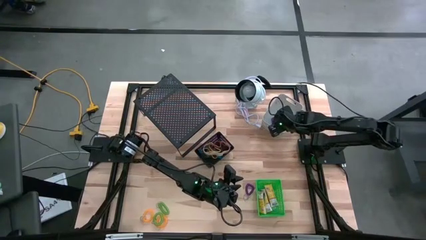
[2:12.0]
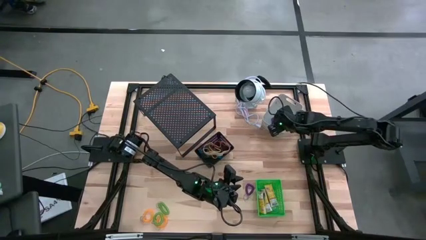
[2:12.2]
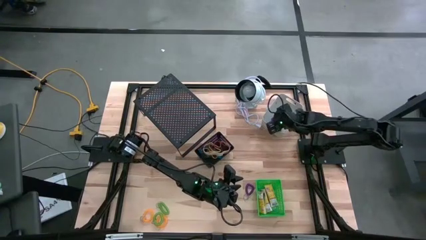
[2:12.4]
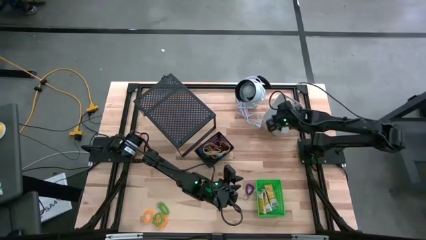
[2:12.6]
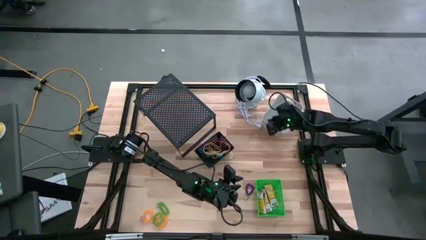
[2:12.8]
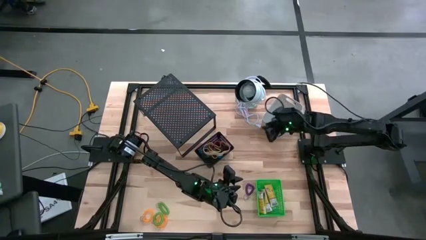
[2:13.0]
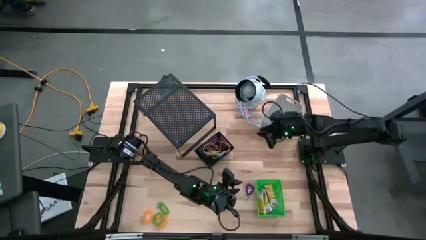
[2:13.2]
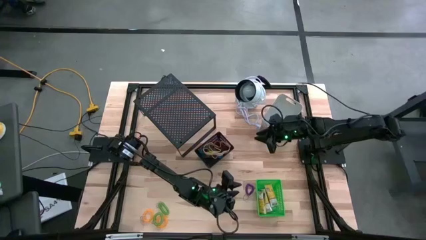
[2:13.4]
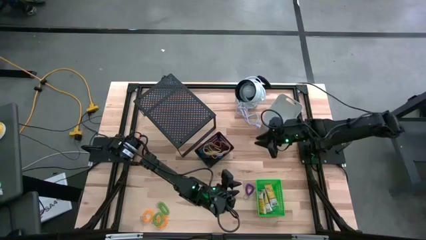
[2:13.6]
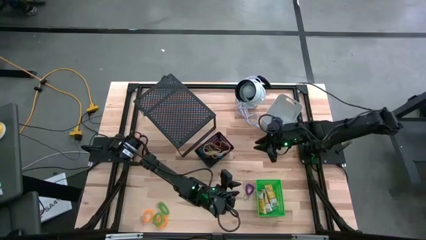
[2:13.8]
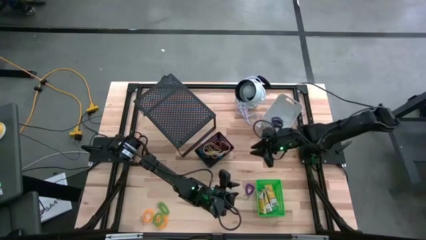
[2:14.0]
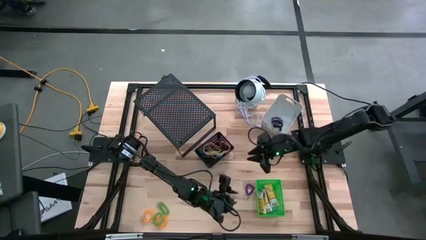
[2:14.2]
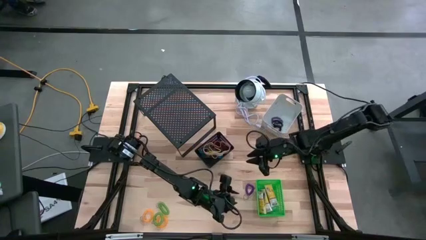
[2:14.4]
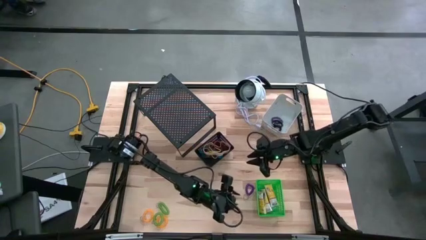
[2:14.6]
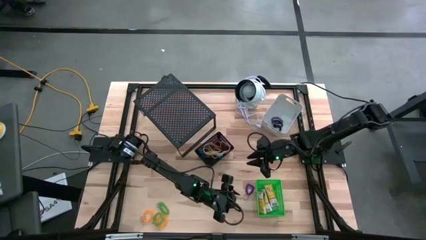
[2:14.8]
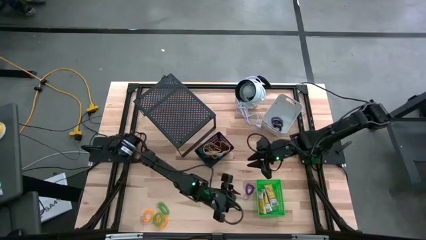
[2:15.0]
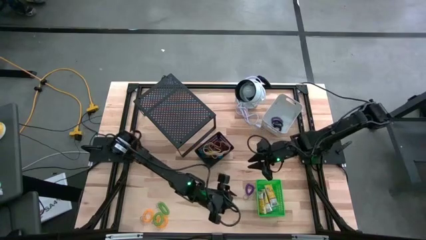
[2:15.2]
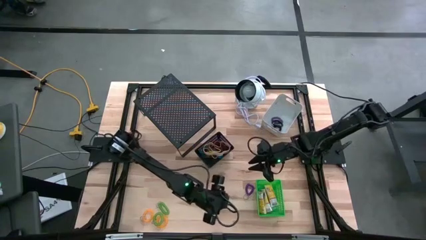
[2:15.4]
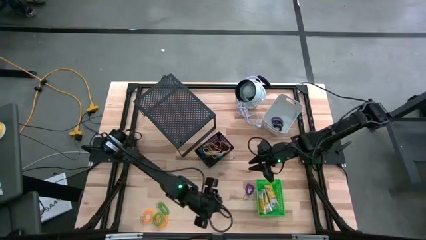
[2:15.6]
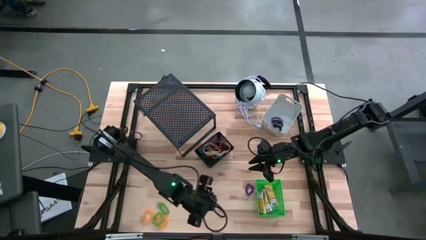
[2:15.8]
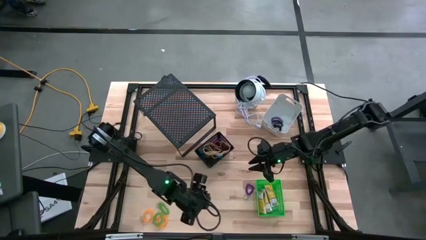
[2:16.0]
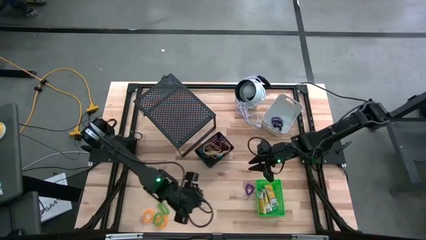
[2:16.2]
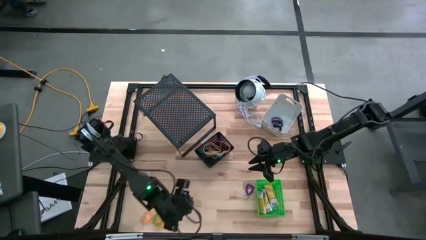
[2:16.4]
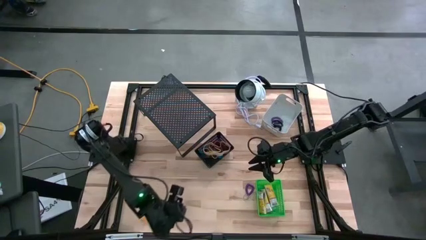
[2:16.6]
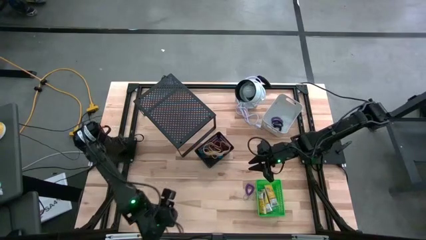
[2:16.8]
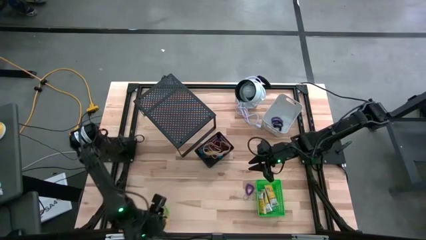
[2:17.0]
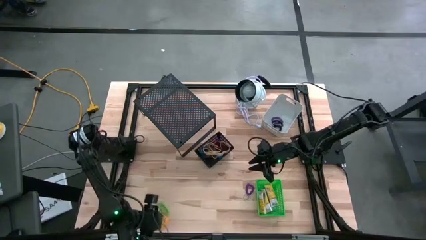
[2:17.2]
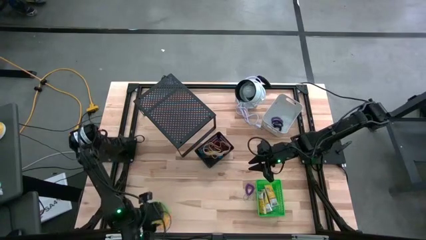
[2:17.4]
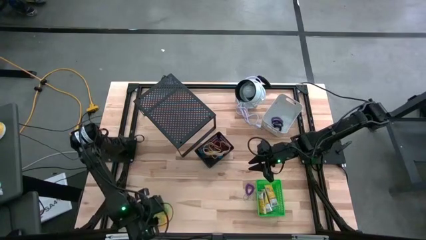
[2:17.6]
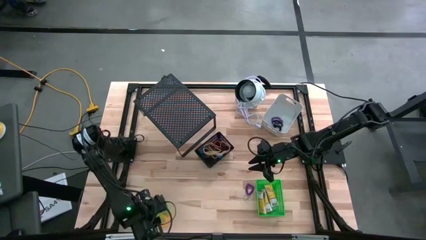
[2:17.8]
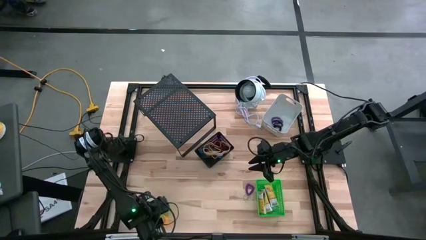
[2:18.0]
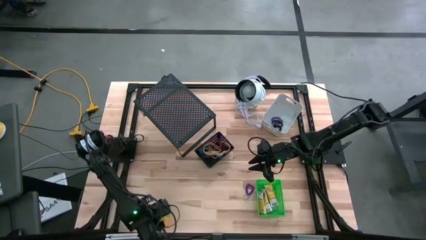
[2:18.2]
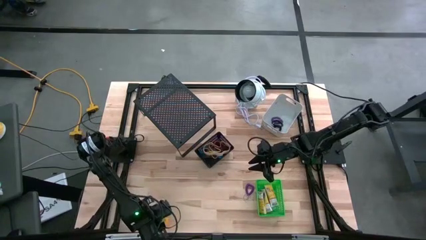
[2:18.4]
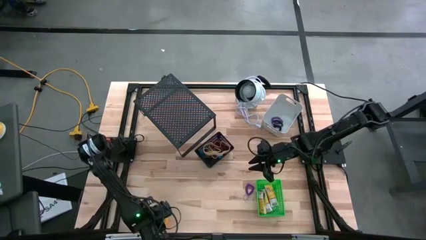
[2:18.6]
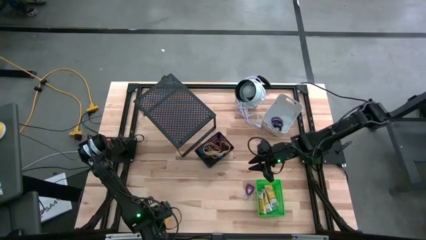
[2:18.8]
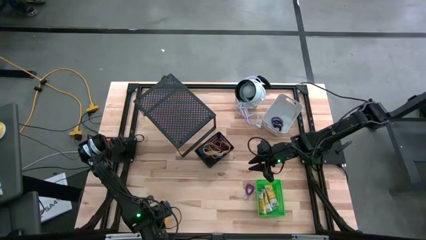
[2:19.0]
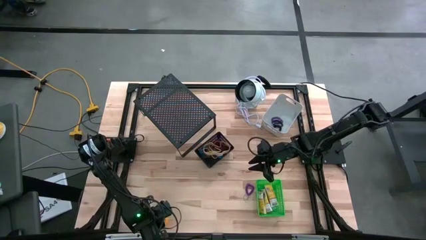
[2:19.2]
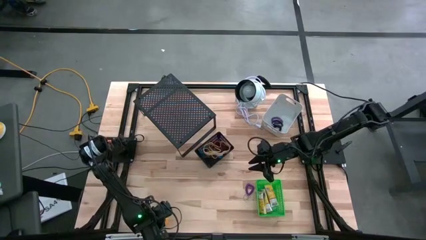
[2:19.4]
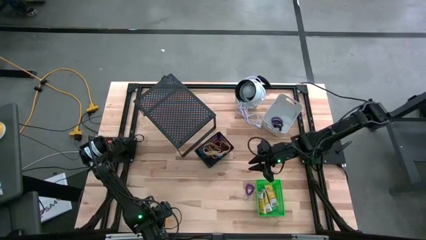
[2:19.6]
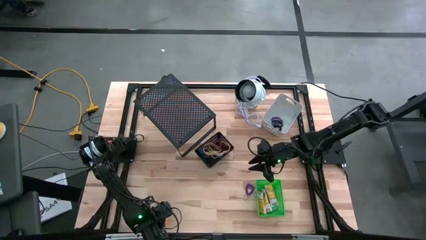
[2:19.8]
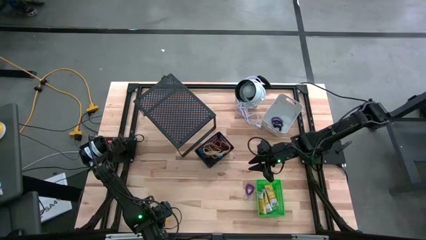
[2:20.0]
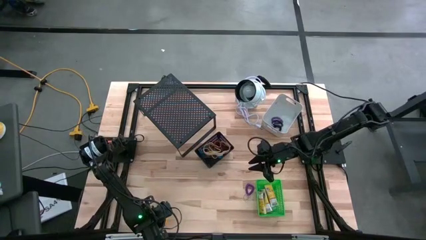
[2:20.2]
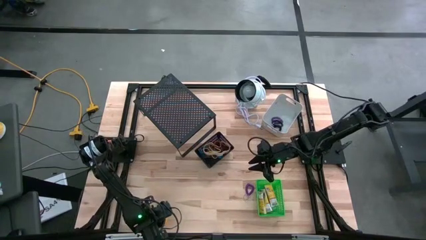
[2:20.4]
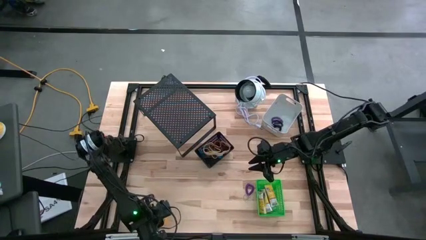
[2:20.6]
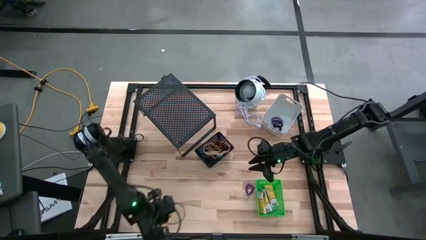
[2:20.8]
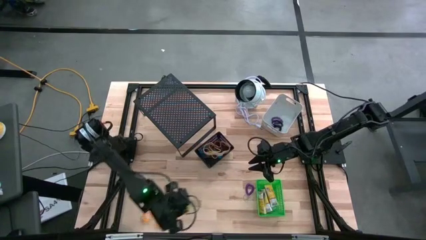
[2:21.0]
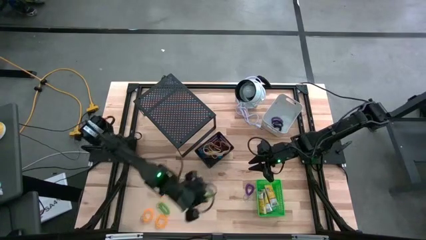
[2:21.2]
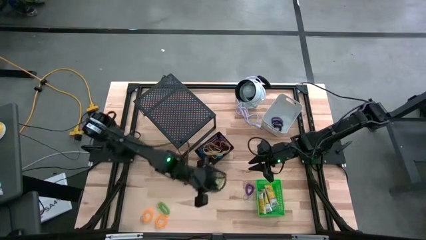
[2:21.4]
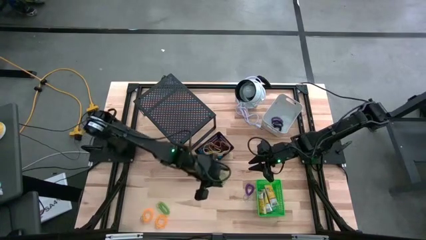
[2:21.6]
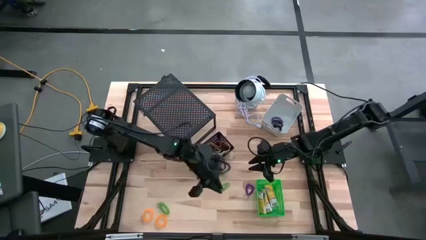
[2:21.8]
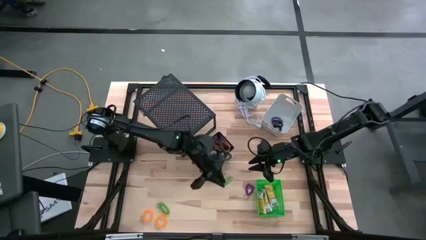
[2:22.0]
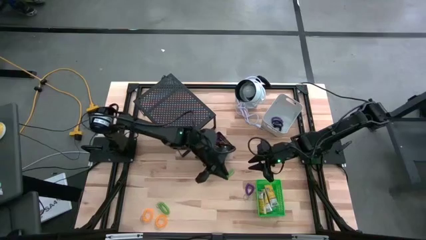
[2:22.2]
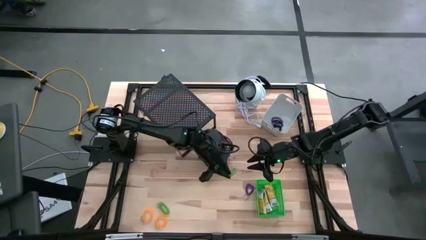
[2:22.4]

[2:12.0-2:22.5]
Task: Pick & Place Office Desk Supplies
Put the bottom green spring keychain into the white bin

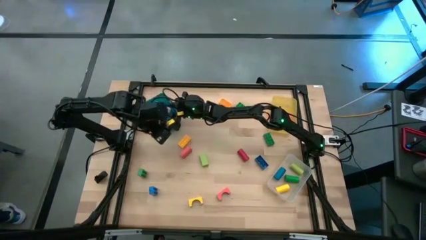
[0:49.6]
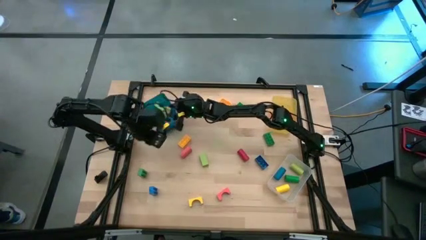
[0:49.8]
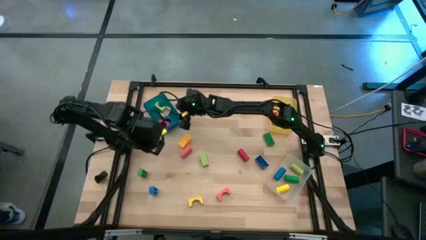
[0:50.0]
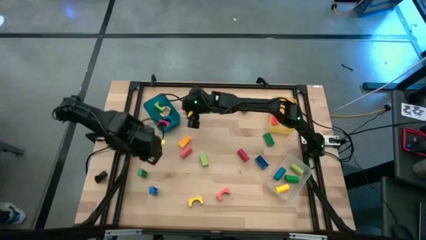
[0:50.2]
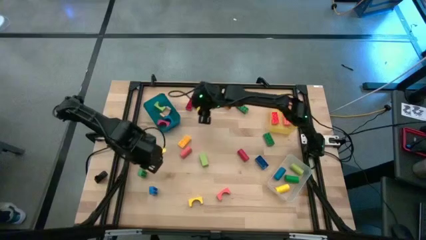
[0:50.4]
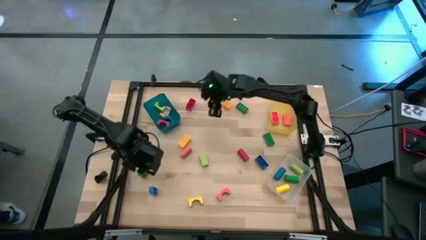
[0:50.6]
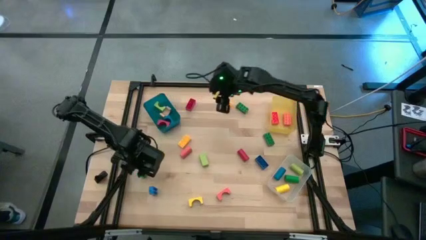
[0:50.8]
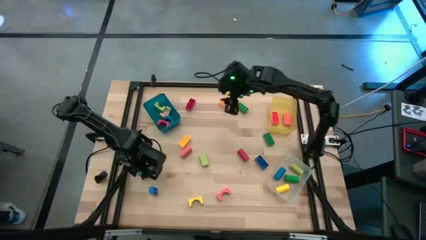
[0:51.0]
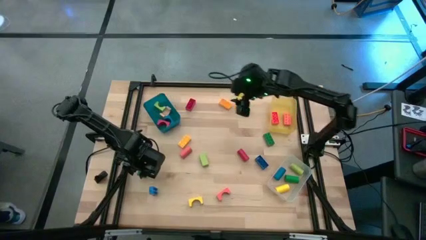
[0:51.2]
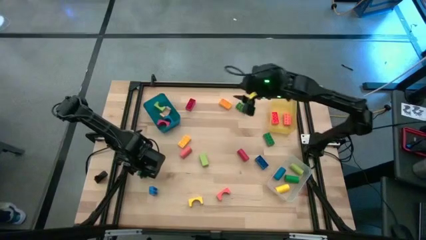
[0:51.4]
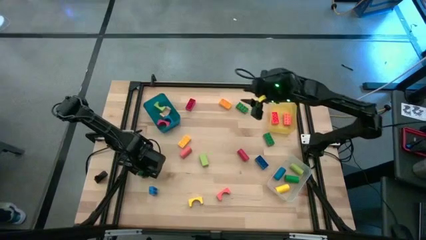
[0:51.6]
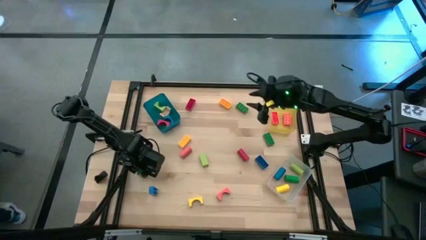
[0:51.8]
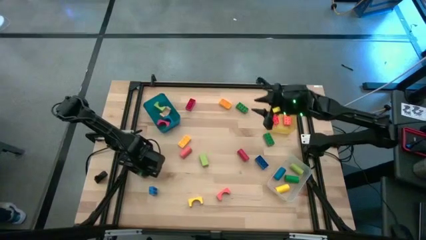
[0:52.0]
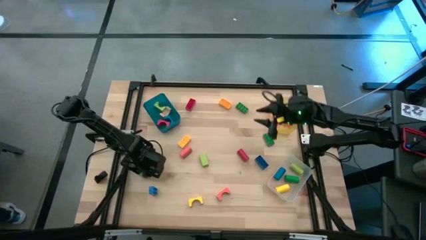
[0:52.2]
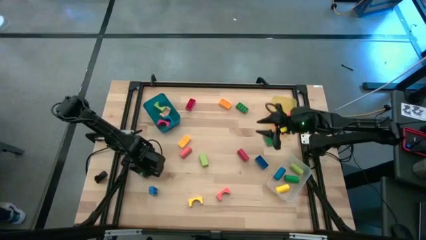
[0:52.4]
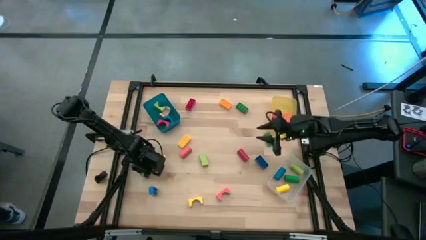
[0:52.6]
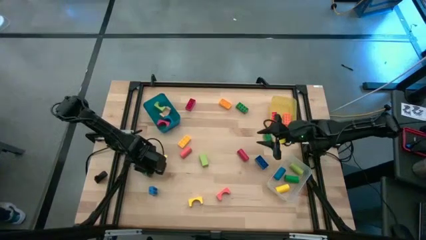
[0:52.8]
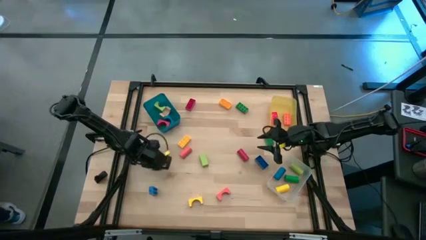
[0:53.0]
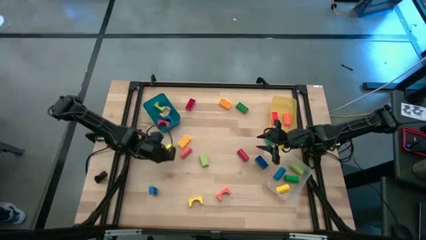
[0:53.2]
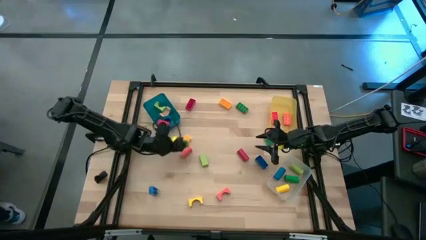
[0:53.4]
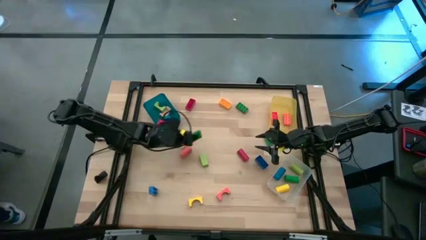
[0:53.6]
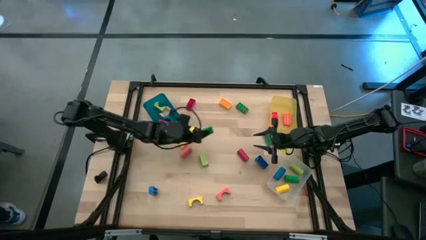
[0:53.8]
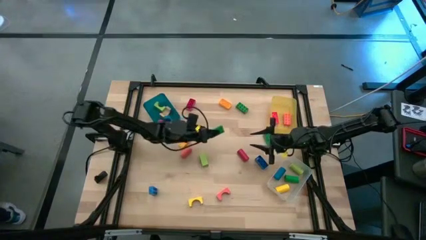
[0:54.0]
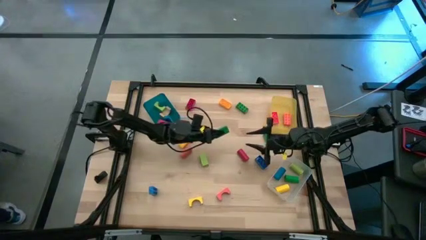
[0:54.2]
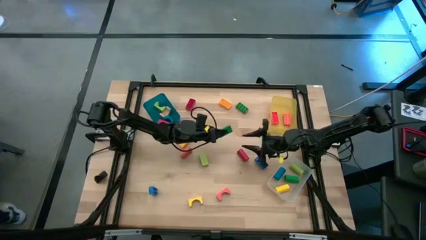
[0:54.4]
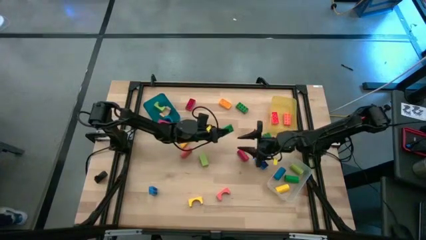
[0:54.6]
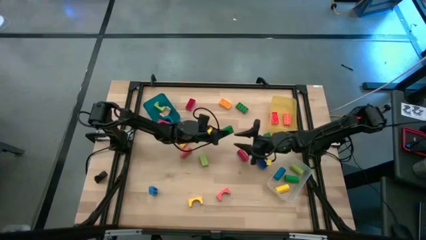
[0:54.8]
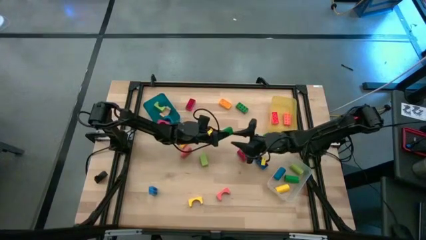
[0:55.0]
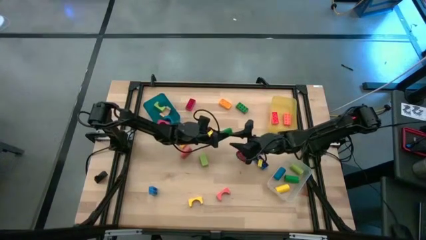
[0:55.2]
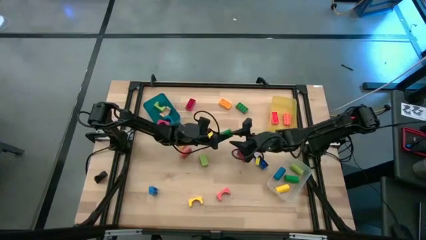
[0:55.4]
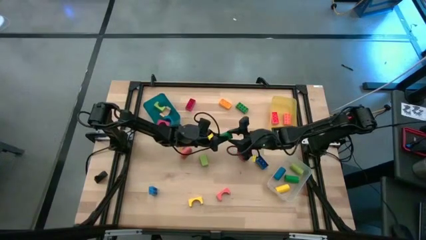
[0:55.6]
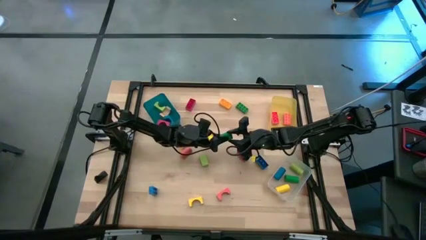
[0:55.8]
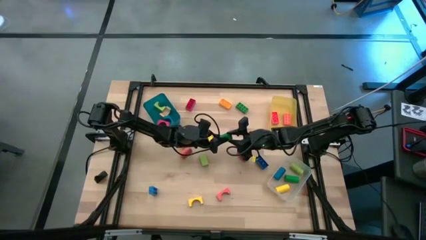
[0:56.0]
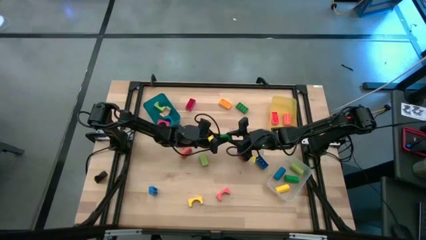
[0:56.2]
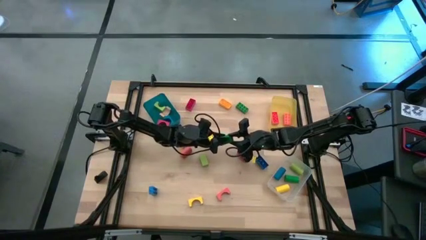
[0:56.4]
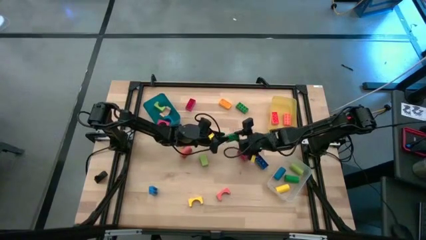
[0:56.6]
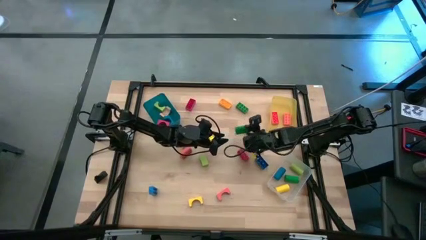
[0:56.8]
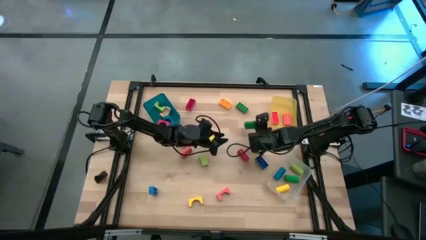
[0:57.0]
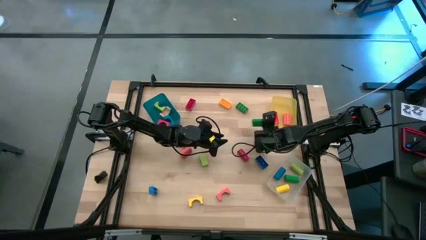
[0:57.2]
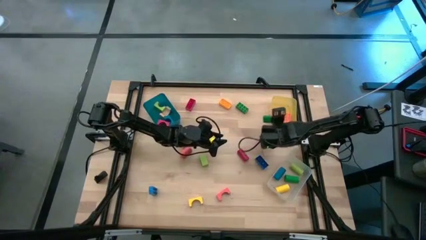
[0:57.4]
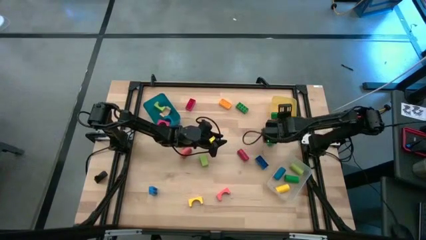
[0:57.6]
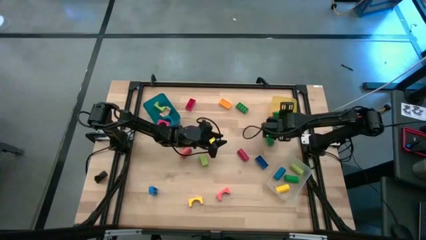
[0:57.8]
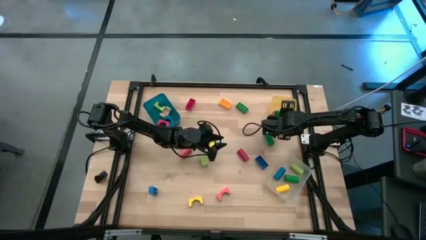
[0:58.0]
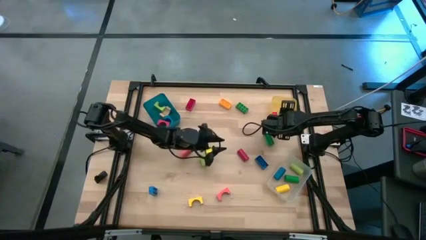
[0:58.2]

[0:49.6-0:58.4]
Task: Sort blocks by size
Put the green game piece into the yellow bin
